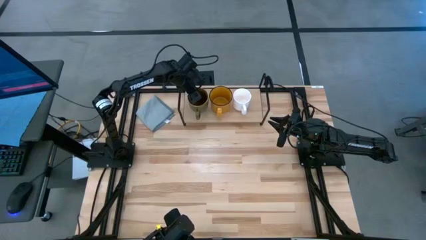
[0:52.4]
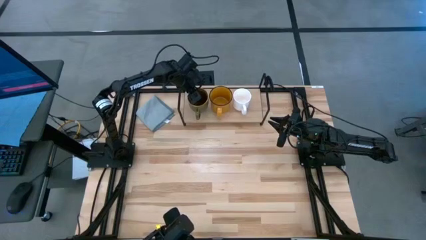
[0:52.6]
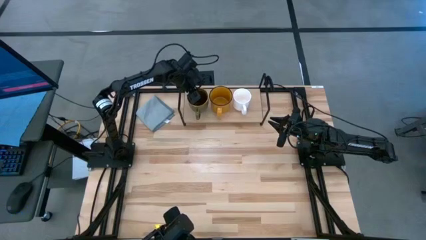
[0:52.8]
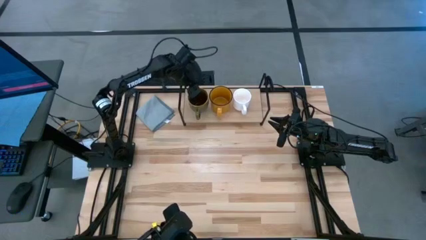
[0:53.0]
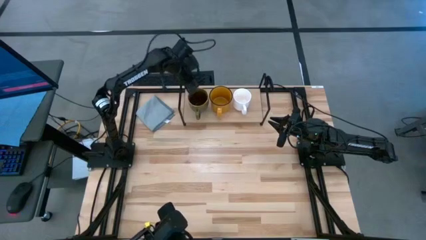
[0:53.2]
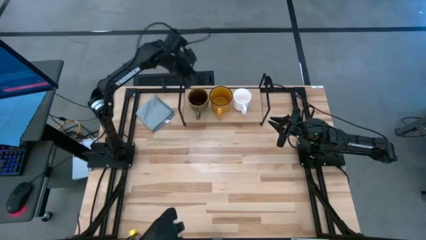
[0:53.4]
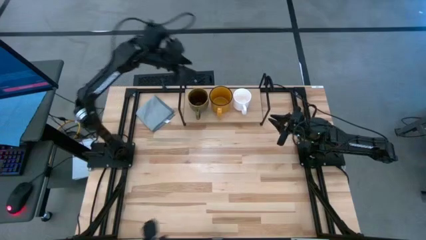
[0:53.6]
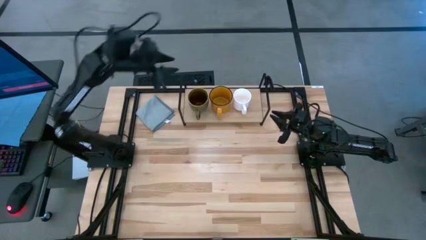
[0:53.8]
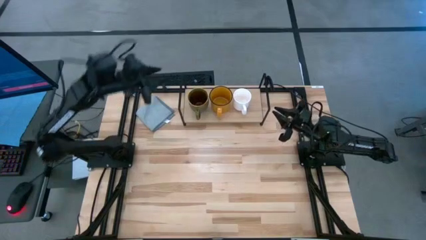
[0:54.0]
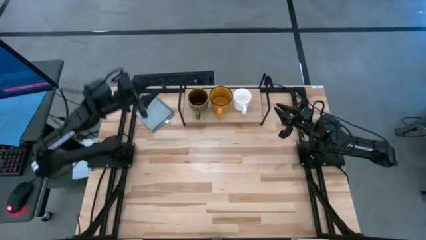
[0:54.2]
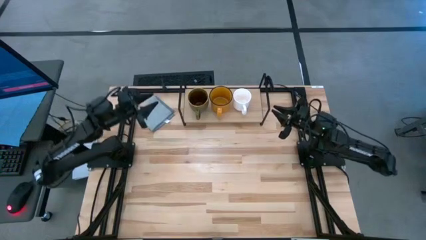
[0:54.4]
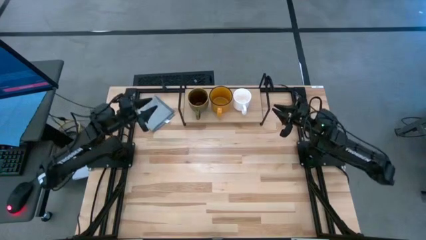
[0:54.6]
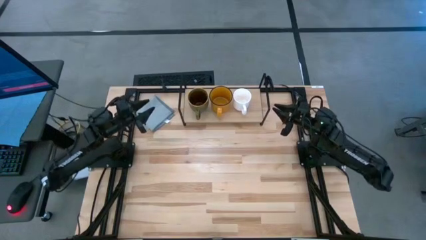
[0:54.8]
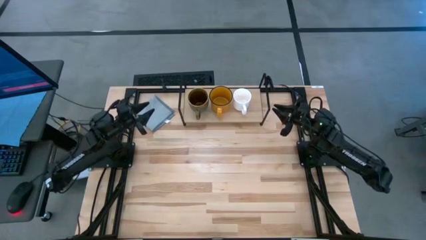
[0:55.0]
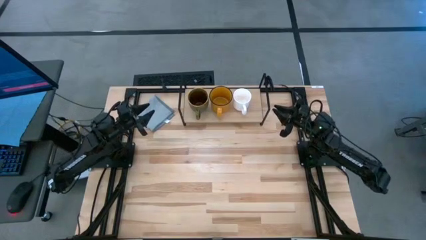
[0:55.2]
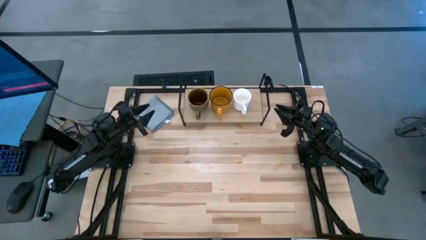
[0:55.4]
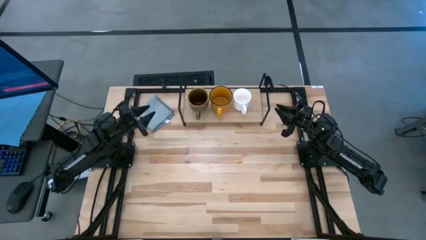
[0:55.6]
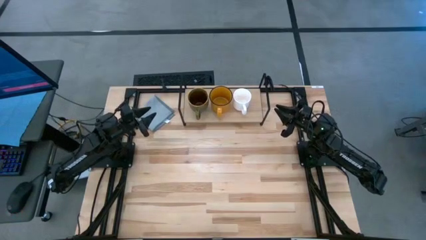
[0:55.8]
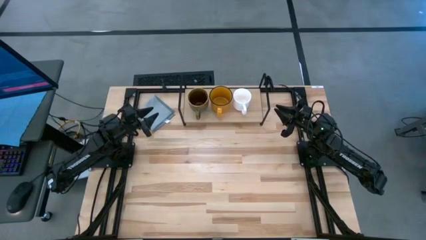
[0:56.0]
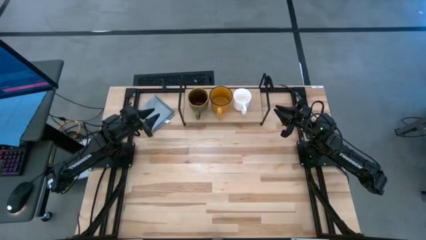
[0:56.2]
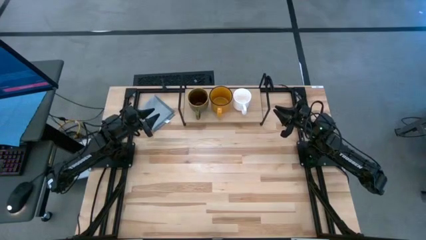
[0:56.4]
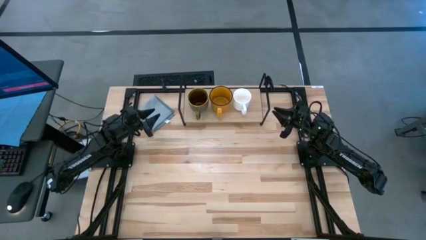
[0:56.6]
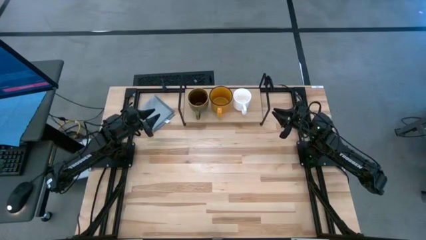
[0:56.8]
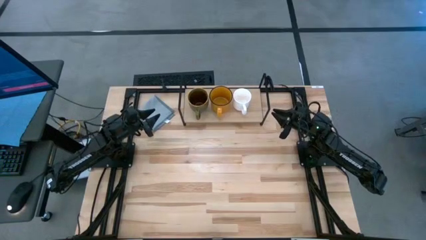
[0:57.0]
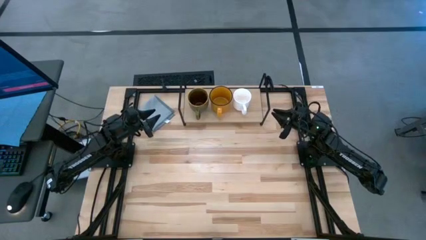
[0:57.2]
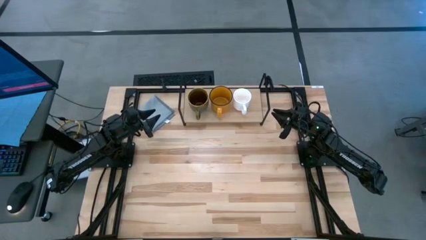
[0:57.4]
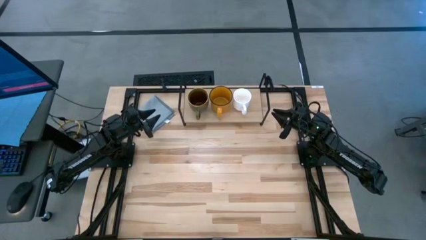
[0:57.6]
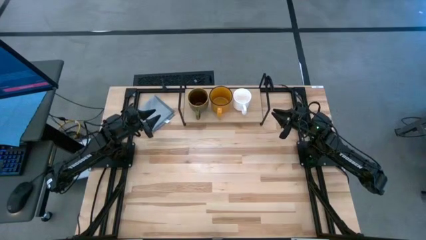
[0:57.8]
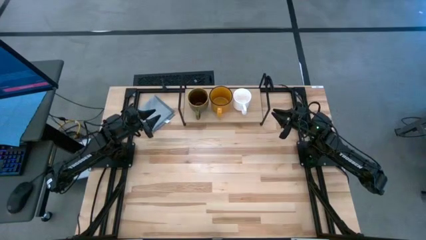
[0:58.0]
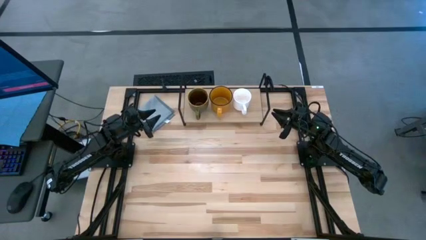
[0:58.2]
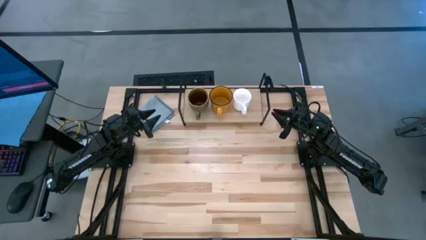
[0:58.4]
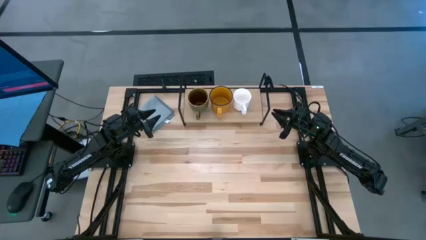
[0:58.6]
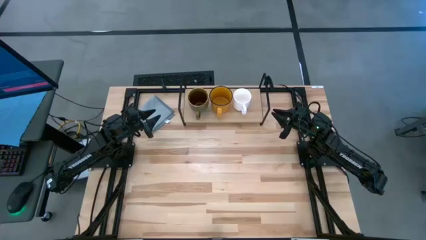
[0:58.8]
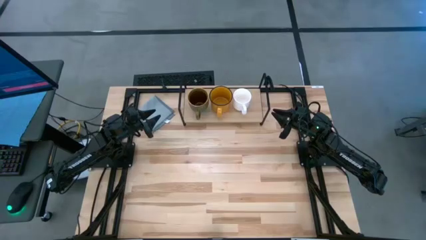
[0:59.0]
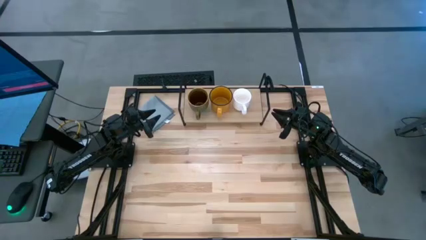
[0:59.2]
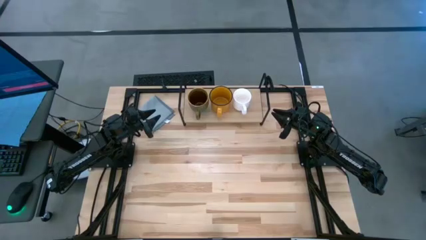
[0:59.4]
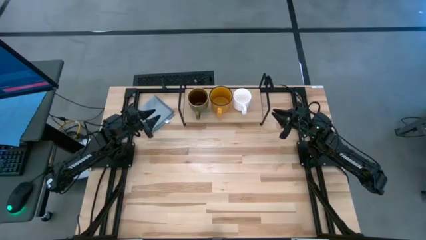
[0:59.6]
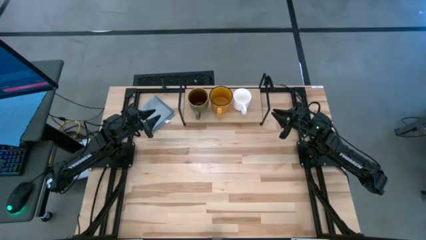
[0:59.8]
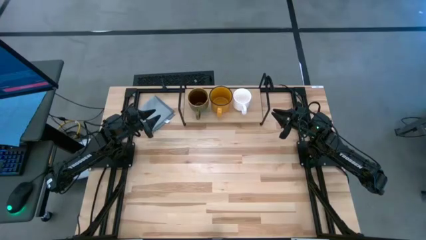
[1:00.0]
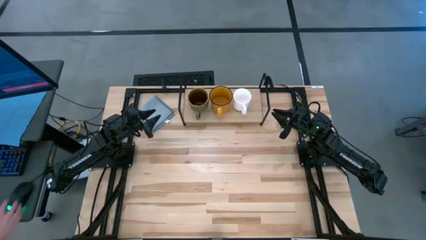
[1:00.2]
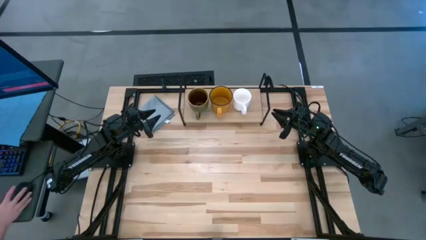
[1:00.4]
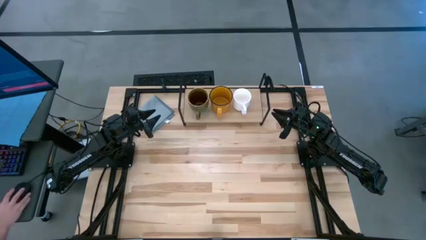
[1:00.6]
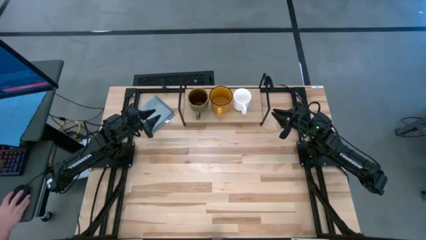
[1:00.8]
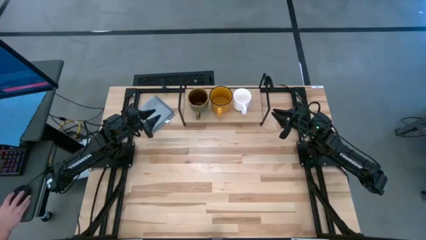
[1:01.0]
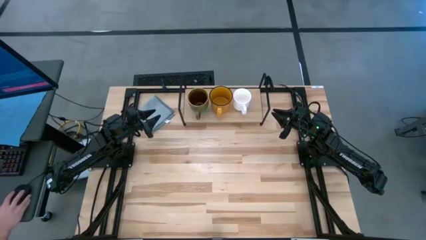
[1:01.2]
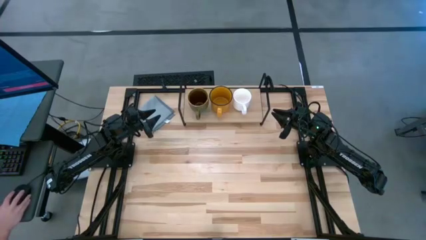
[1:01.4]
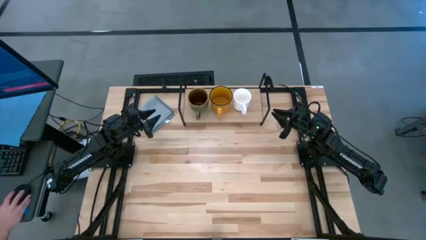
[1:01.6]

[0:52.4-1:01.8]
Task: Stack small to large cups/mugs on shelf
Return to Home Position

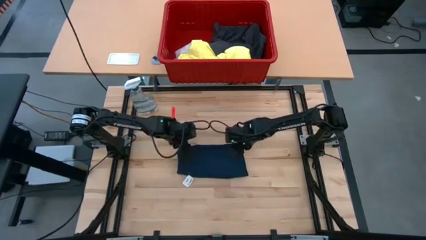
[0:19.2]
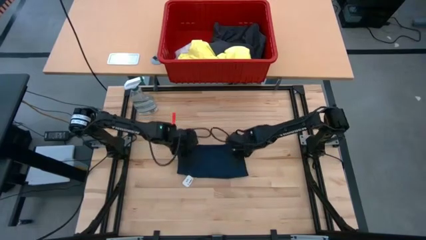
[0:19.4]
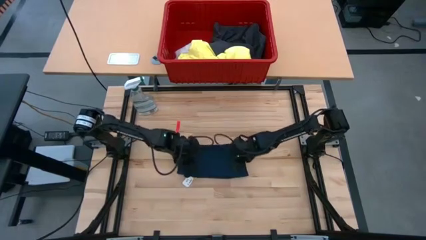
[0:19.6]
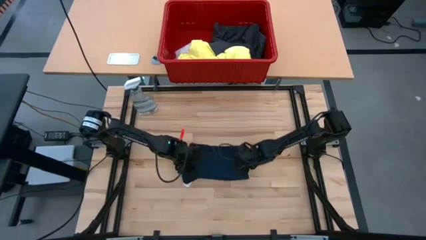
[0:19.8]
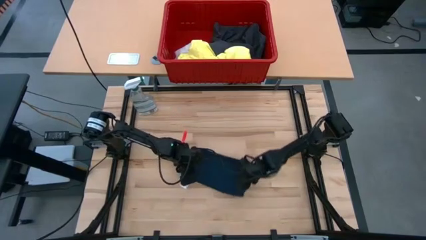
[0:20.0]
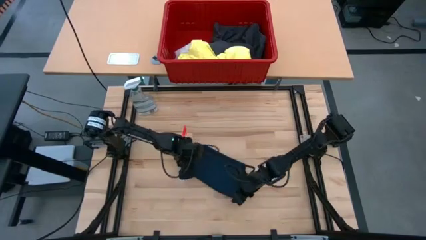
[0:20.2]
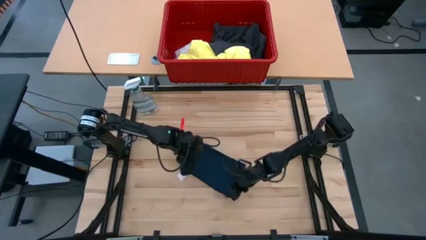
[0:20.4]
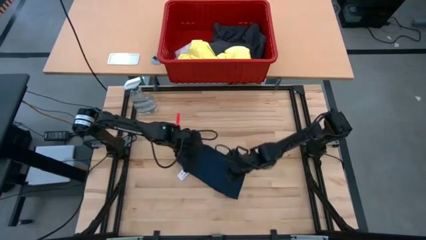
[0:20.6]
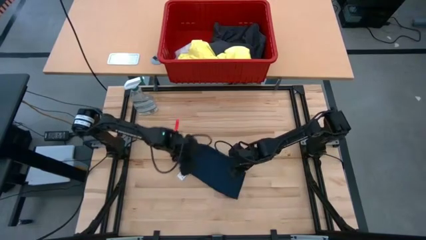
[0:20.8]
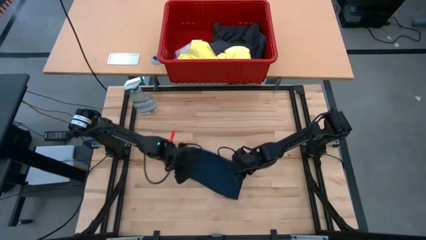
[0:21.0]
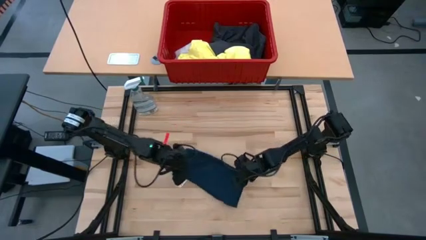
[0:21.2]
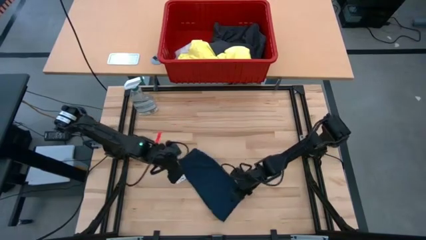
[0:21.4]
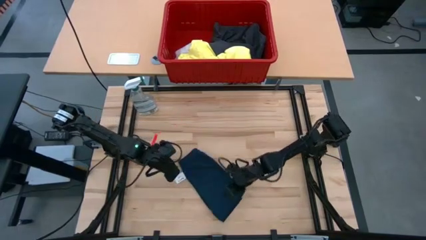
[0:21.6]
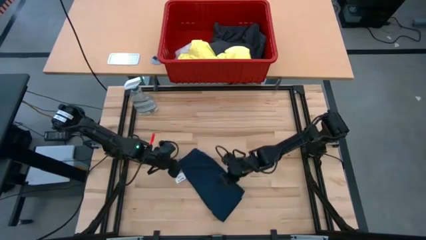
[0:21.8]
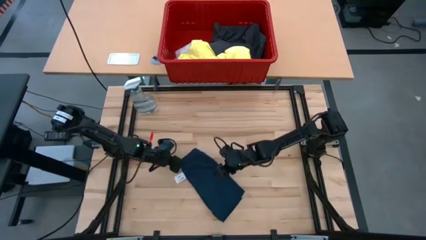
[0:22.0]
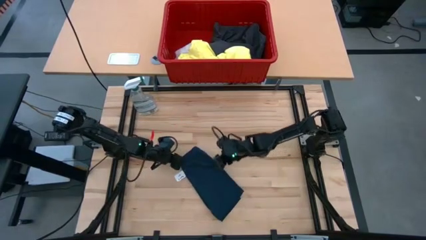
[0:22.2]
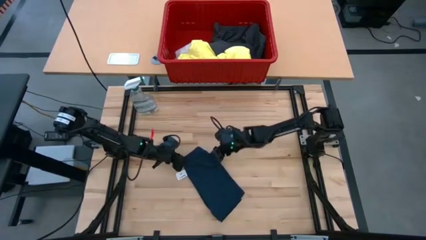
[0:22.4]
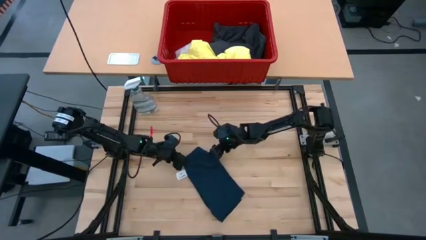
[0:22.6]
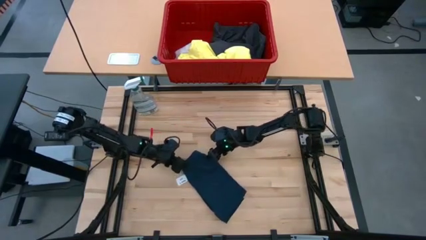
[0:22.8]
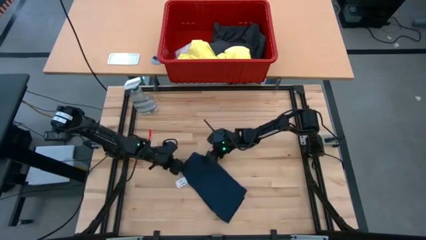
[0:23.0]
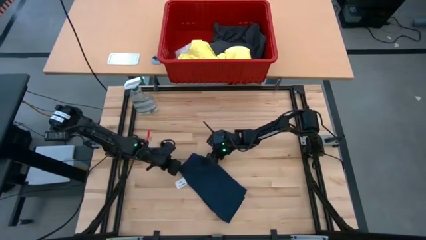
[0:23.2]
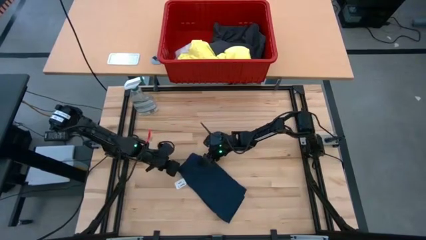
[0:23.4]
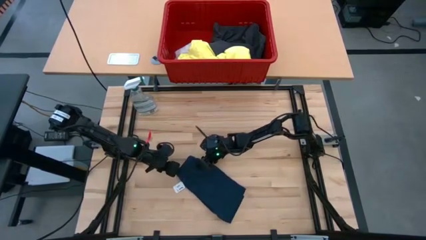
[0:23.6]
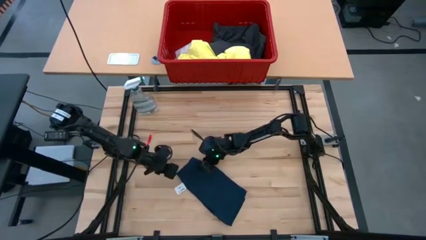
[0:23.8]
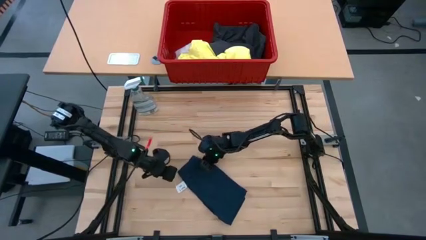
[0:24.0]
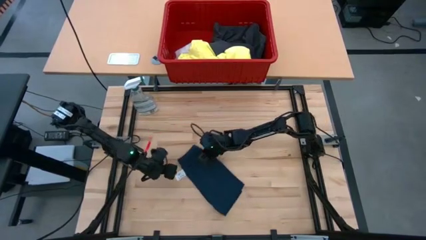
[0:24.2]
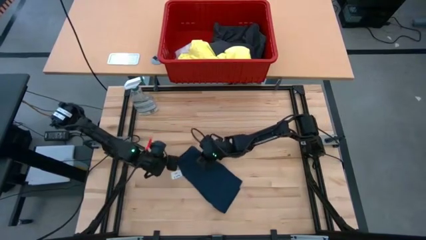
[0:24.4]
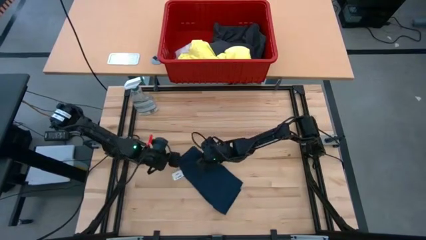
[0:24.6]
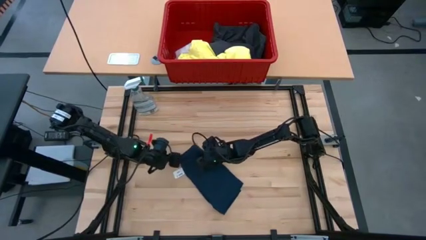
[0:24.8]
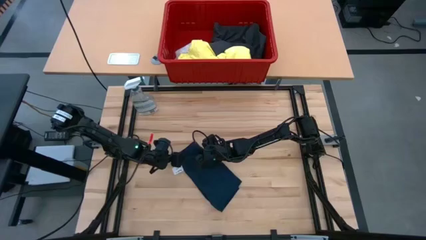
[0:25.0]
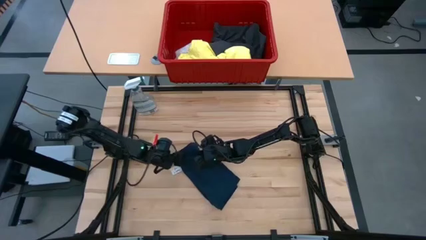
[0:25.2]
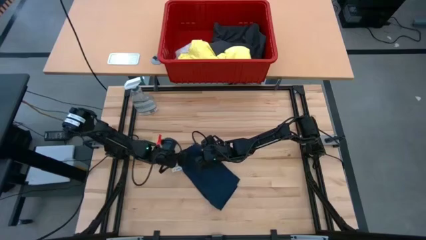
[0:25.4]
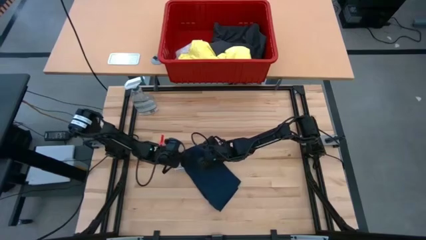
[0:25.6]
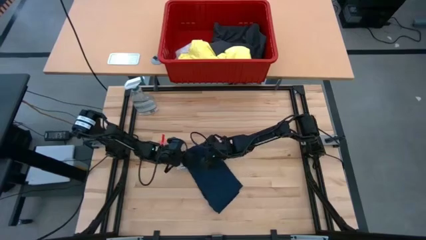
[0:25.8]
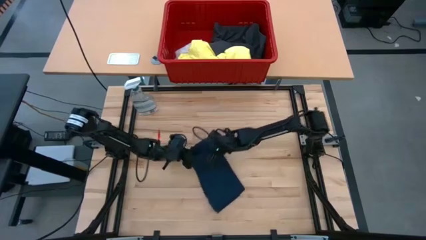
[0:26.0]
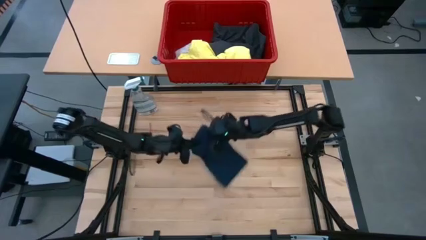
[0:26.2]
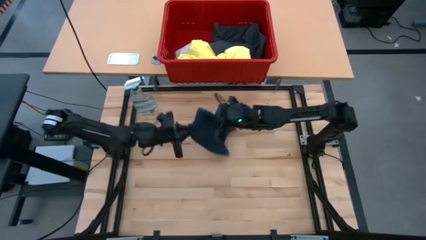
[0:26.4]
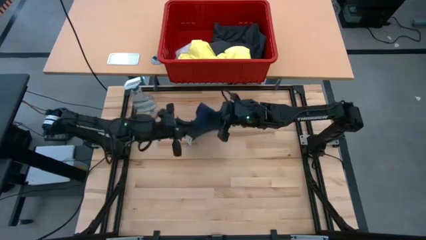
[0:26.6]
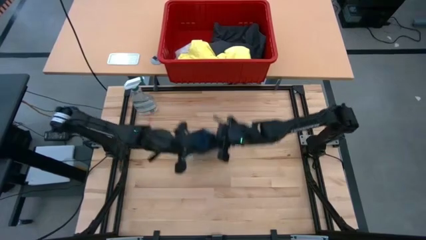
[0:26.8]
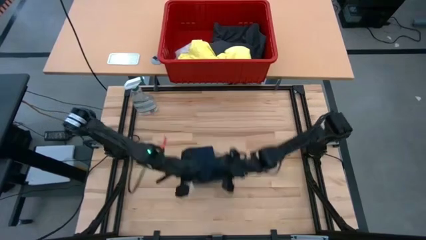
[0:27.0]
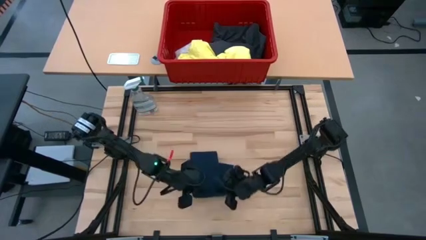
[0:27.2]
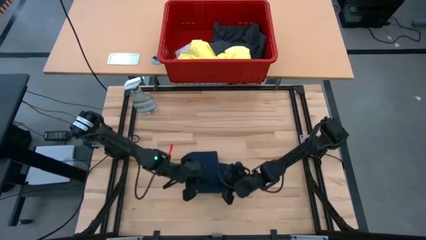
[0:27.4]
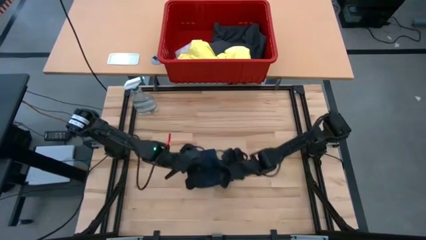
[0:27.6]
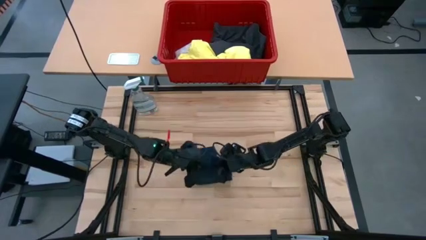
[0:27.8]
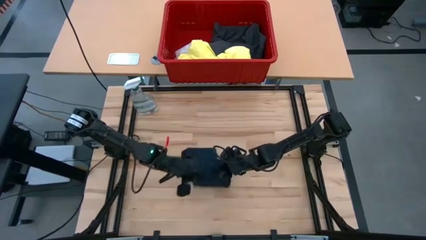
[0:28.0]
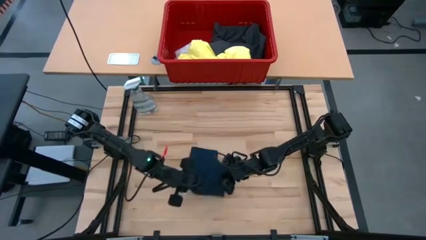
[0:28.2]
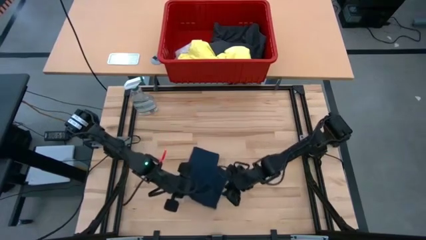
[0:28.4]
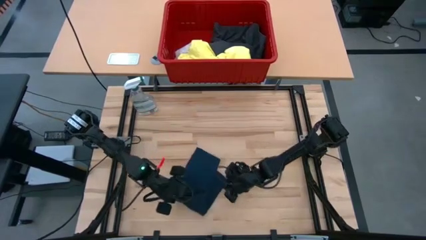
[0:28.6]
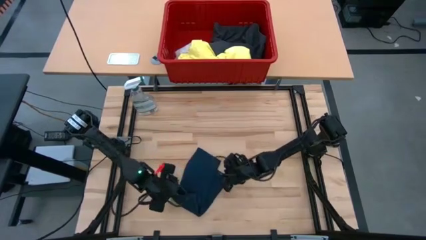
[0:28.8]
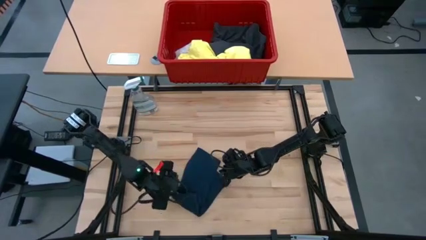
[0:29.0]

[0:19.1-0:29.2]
Task: Fold laundry
Fold the dark blue shorts
